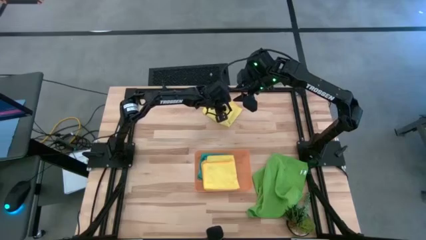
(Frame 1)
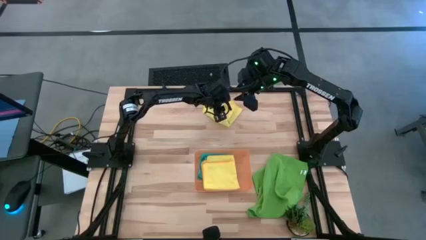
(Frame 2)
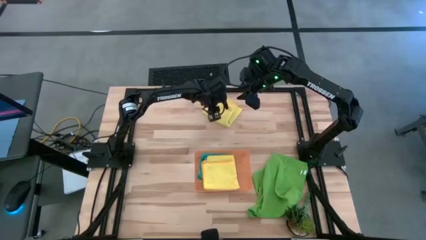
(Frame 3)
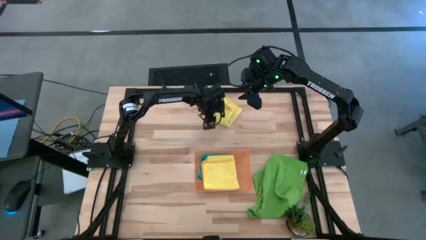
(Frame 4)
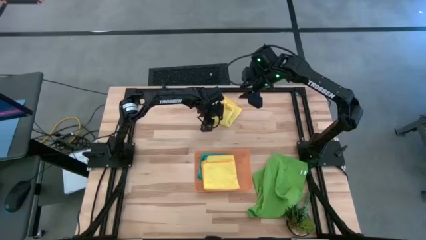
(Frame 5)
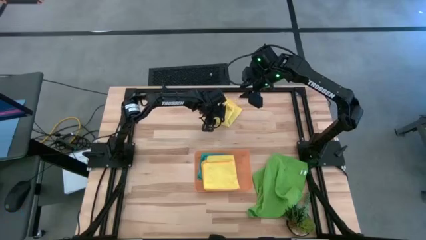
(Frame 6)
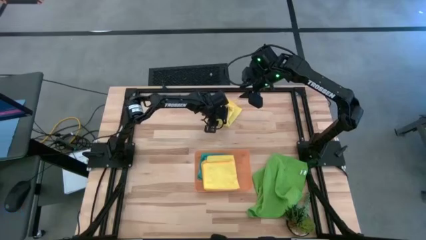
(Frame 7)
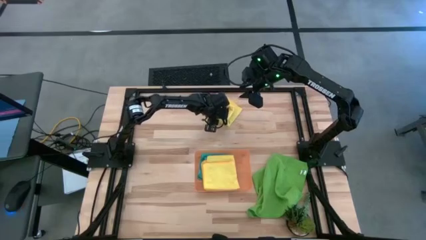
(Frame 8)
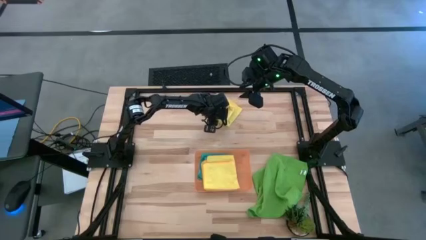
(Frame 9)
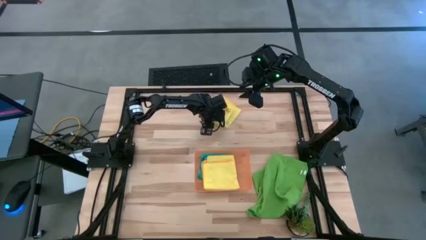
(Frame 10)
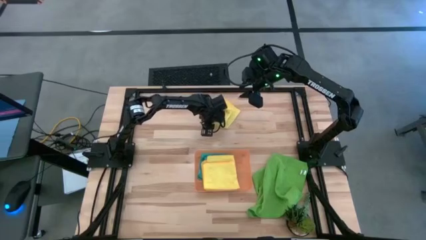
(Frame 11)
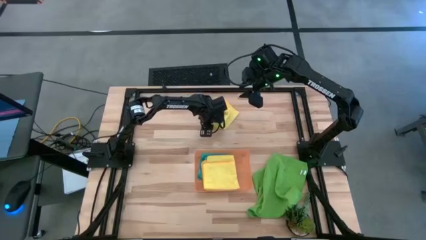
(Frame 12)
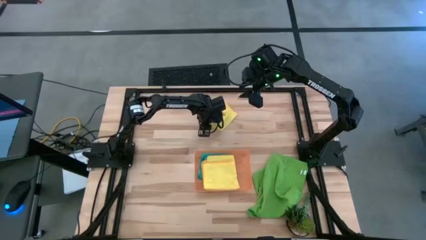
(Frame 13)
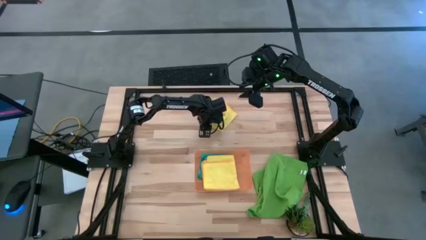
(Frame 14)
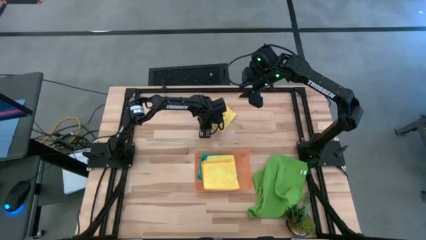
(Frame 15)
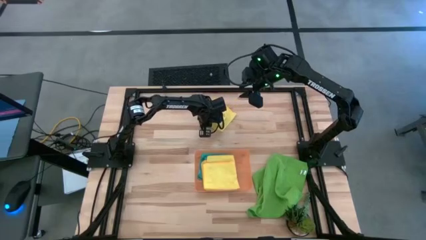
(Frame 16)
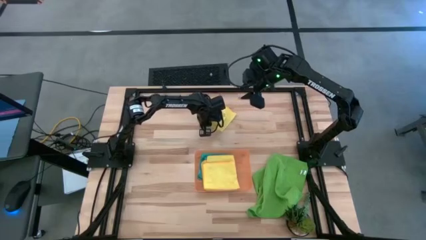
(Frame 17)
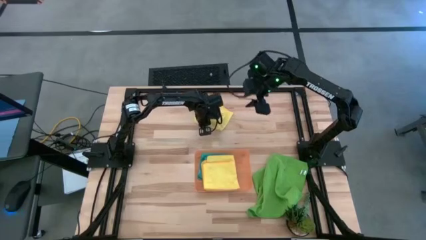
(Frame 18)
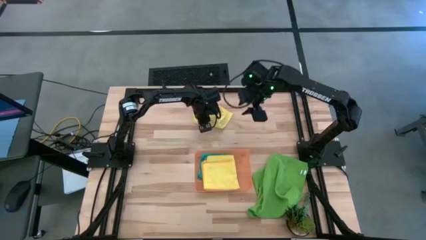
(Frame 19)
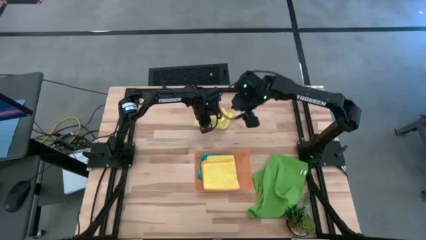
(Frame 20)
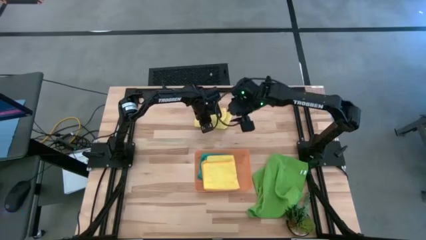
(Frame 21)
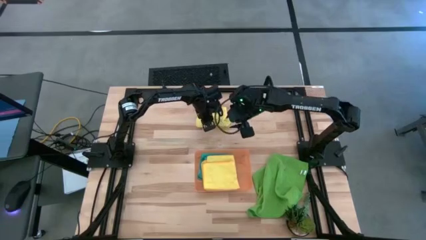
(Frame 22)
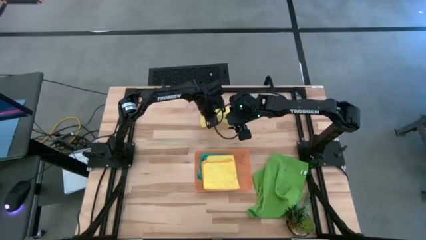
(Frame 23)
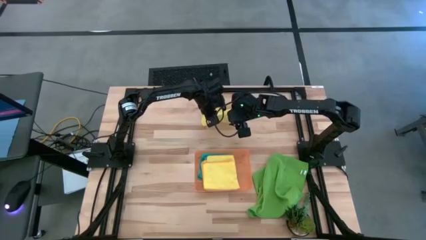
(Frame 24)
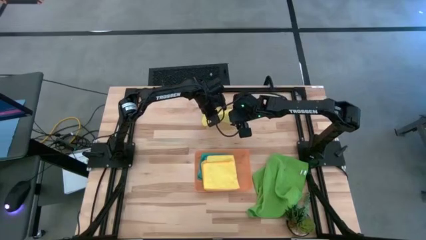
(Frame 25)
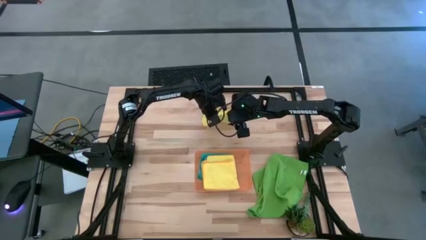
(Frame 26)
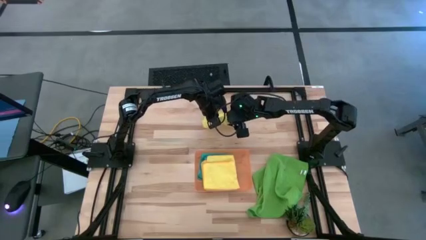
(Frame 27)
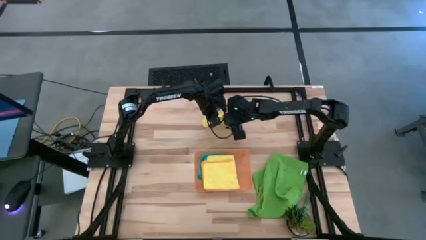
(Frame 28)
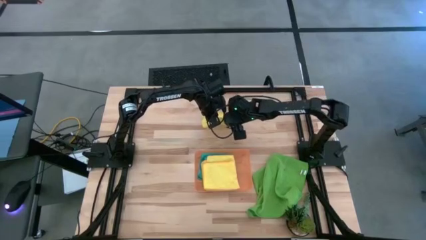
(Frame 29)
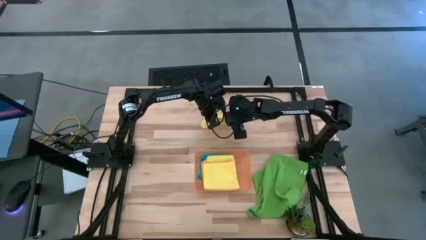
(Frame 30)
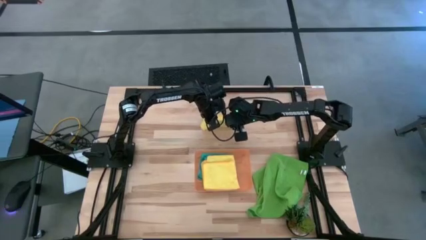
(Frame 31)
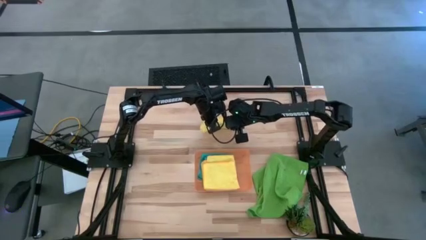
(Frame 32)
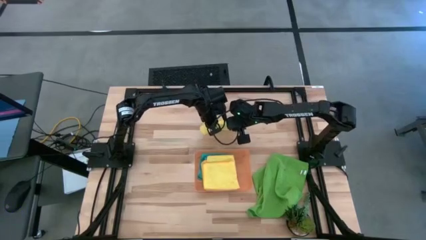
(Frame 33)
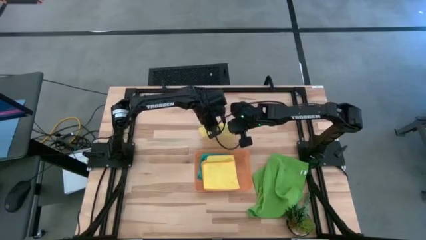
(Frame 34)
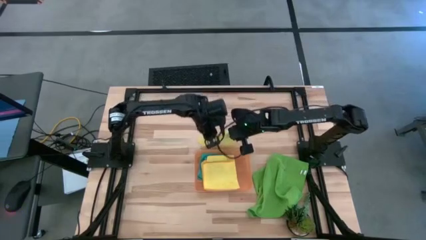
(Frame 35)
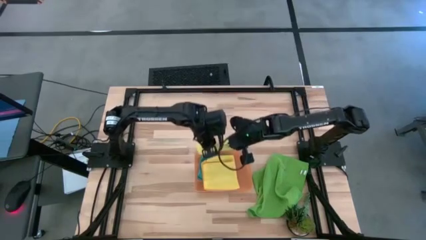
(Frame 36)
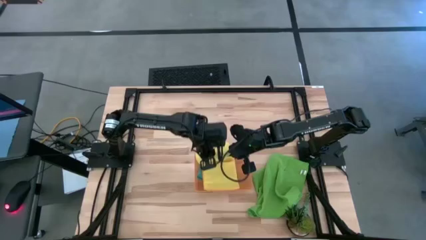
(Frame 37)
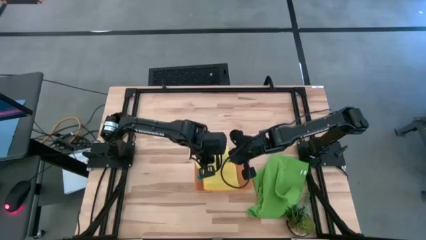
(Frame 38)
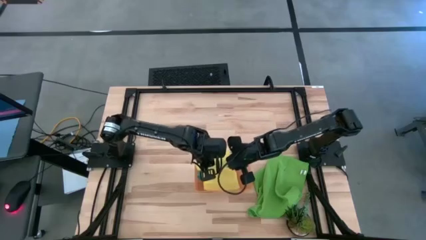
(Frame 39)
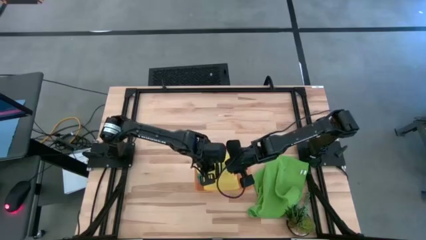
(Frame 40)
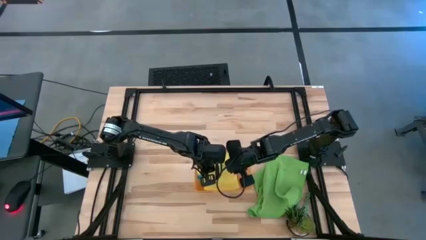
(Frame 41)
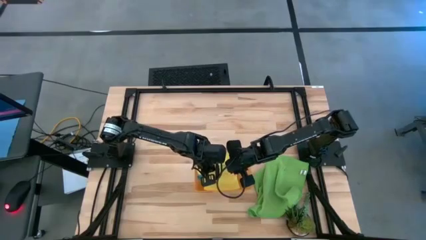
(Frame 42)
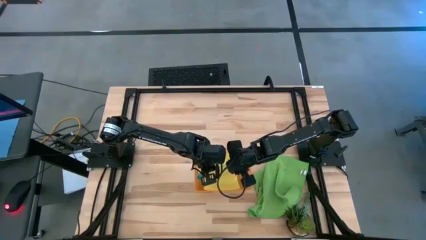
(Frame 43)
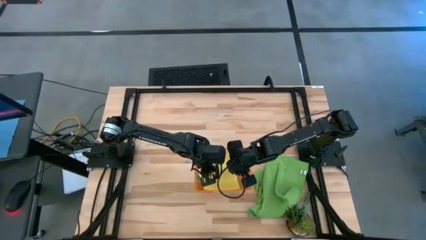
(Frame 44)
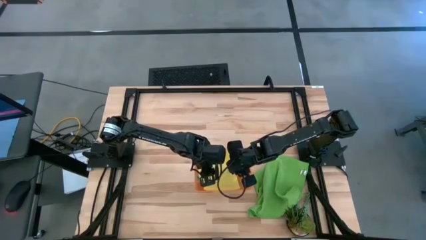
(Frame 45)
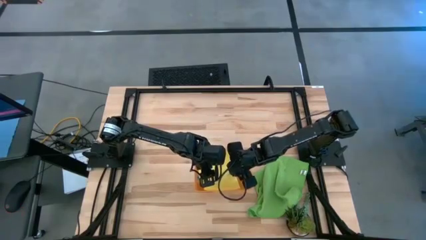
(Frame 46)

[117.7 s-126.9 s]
Task: Fold microfiber towels
Put the yellow towel into the bin
